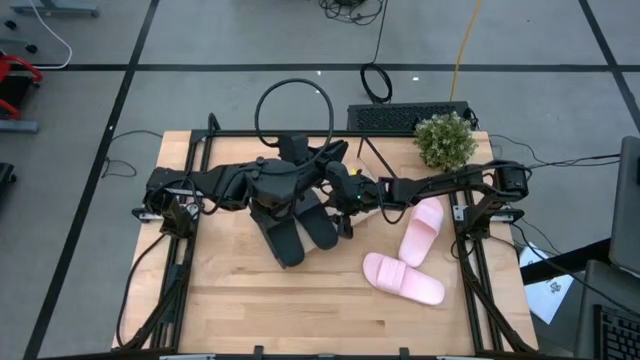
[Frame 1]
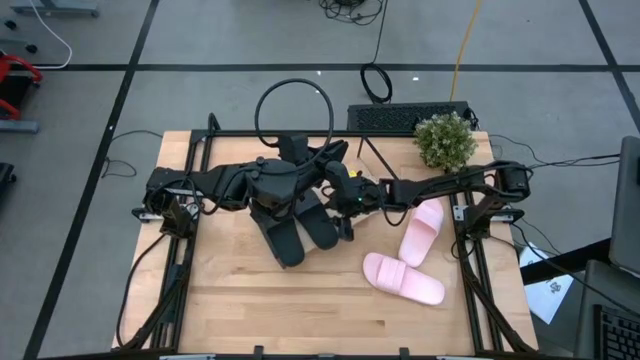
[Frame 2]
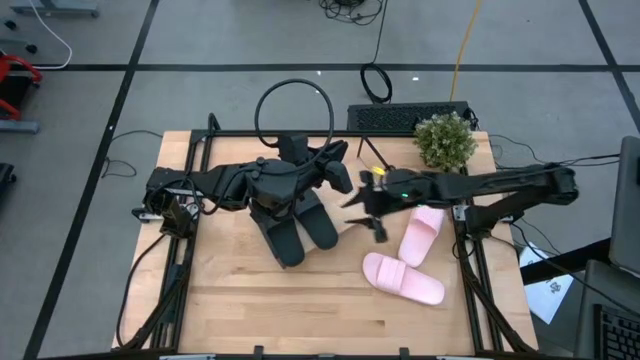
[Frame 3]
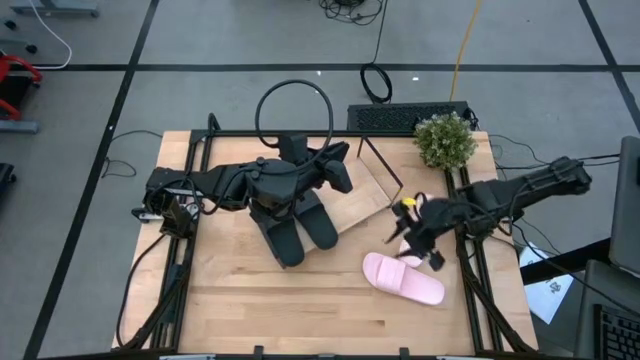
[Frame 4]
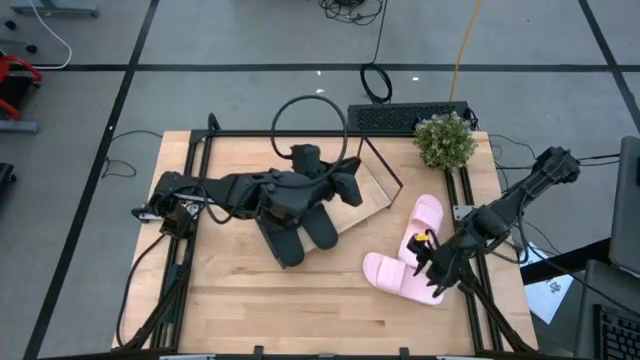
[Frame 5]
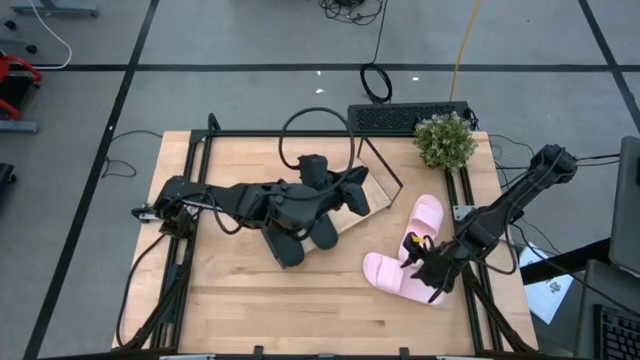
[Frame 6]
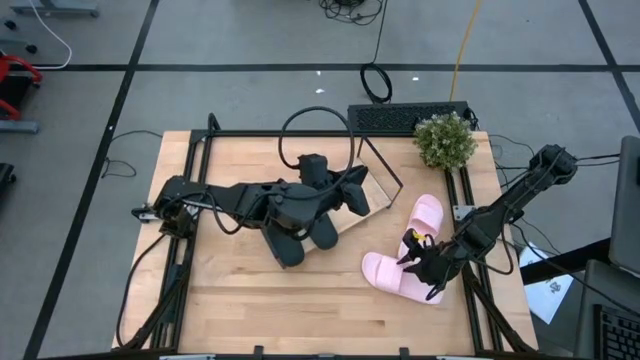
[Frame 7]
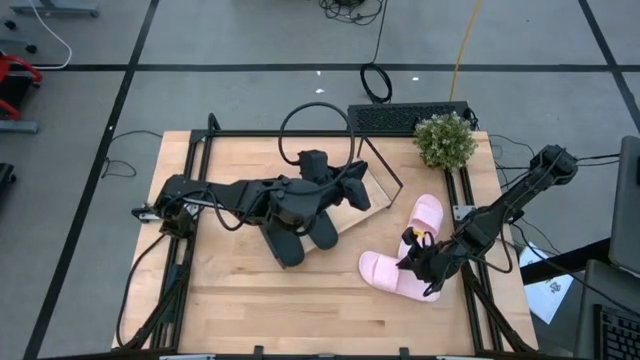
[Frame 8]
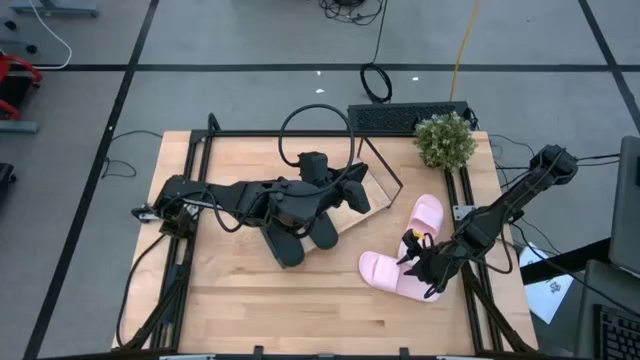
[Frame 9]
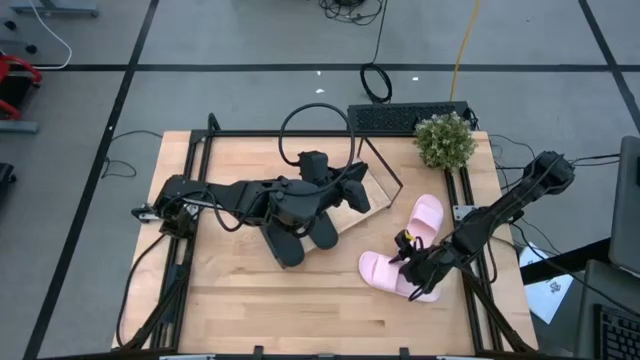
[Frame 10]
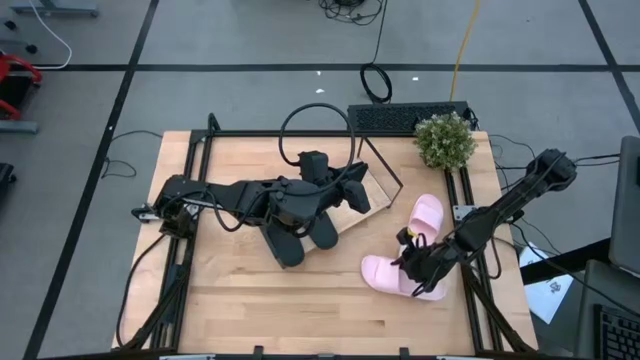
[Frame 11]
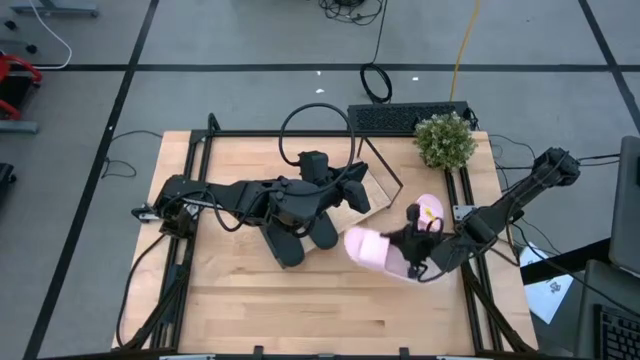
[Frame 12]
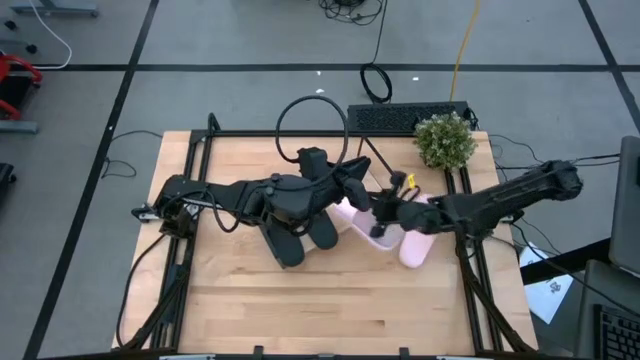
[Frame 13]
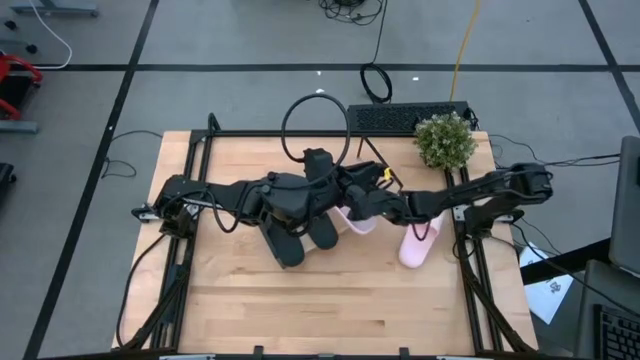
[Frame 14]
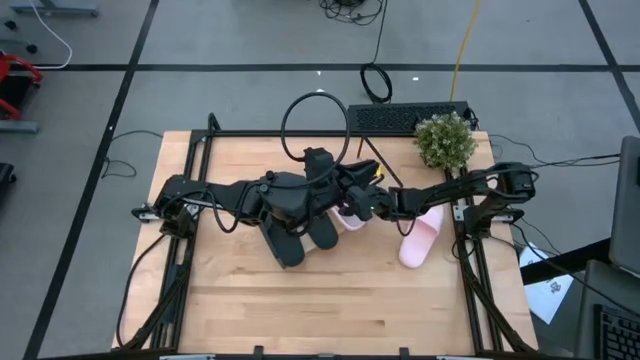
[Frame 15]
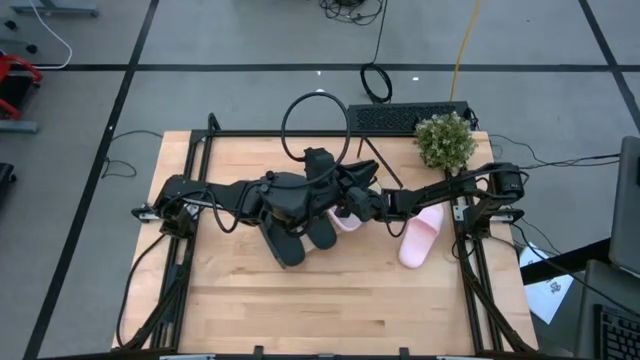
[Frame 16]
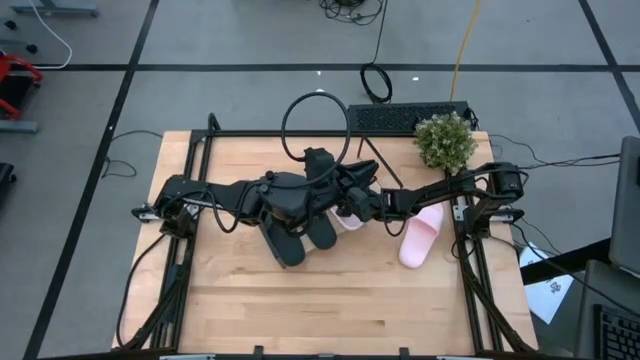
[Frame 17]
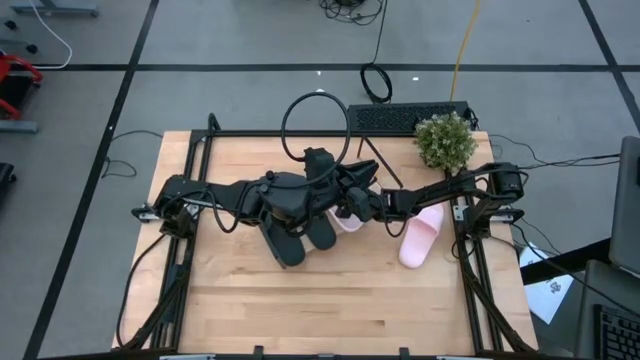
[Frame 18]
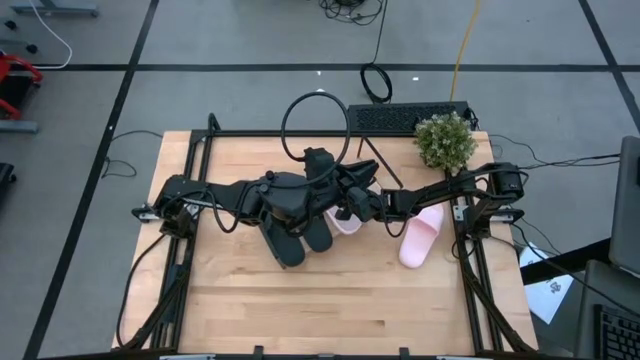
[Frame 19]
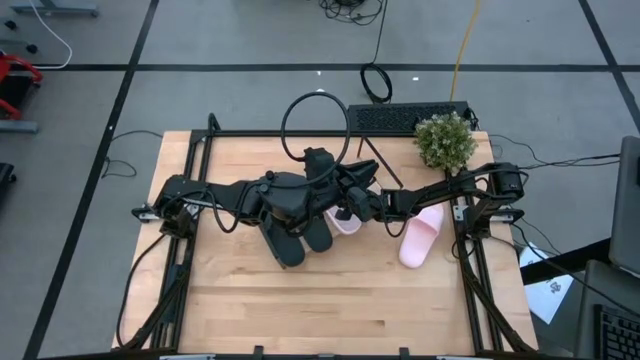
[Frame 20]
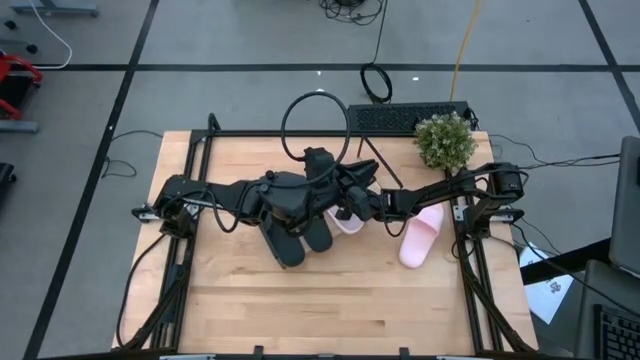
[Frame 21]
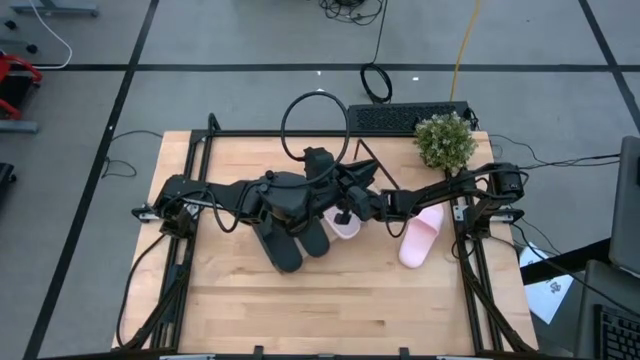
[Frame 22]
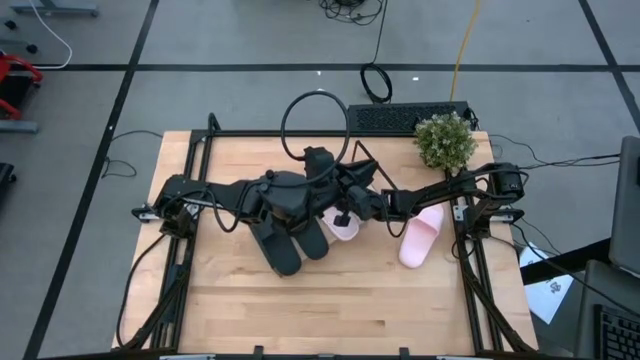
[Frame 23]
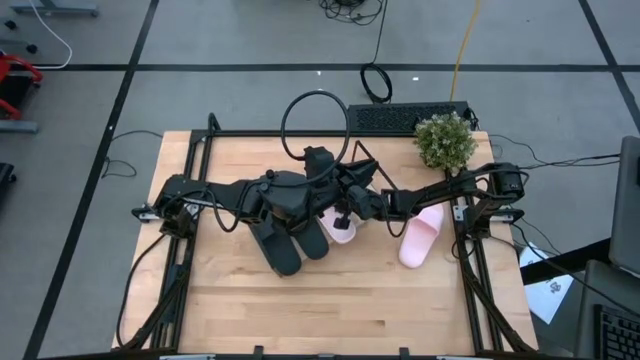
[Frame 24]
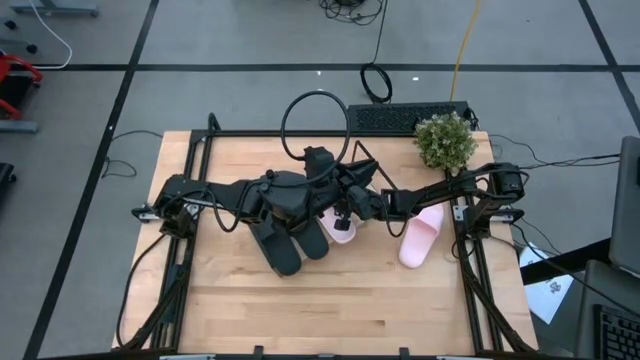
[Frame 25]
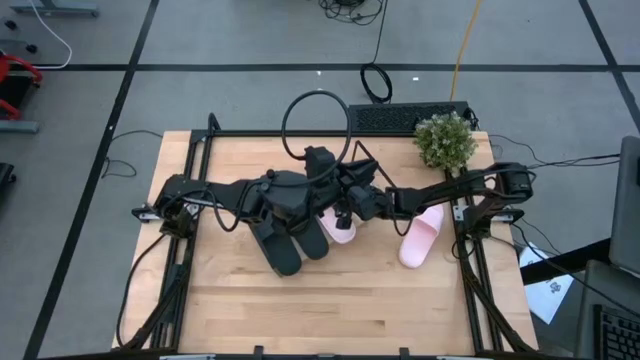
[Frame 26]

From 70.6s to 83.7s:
Task: Pick and place slides into the shelf
Put the bottom pink slipper on the shelf

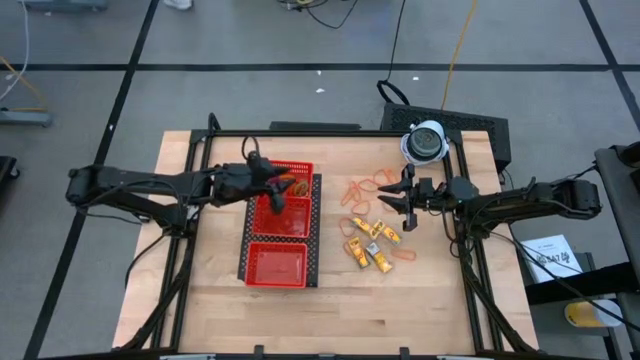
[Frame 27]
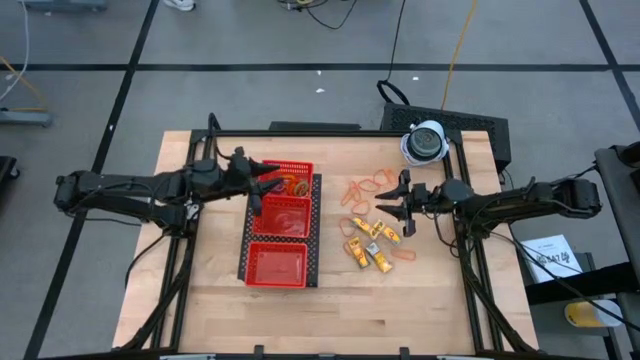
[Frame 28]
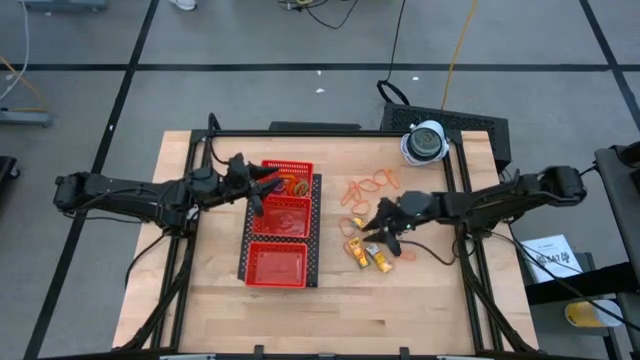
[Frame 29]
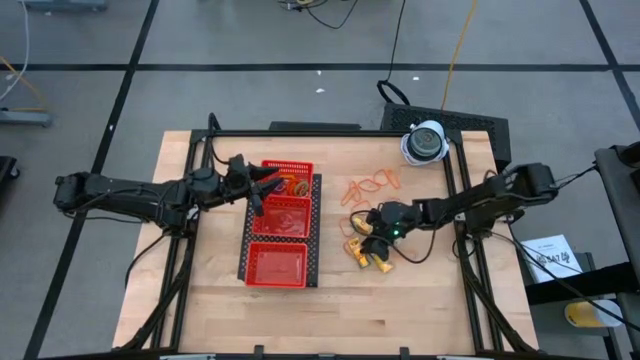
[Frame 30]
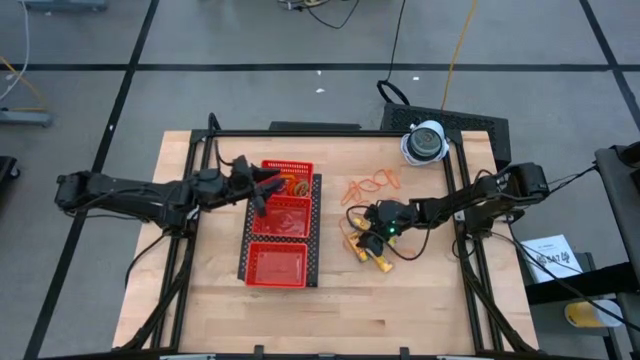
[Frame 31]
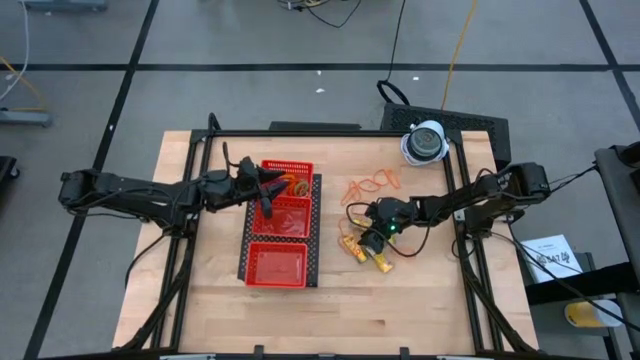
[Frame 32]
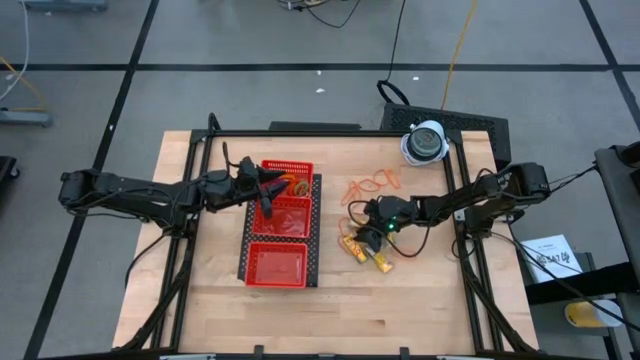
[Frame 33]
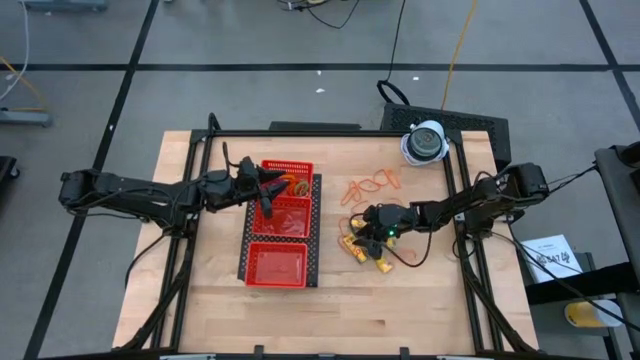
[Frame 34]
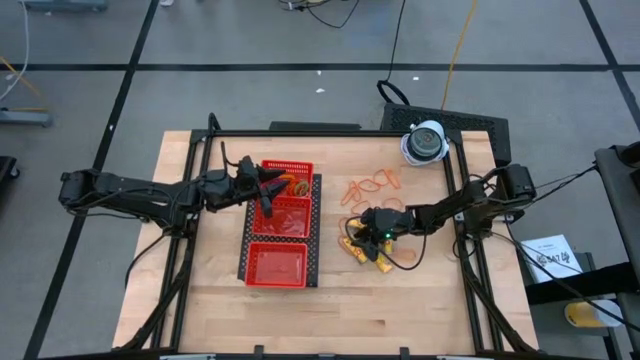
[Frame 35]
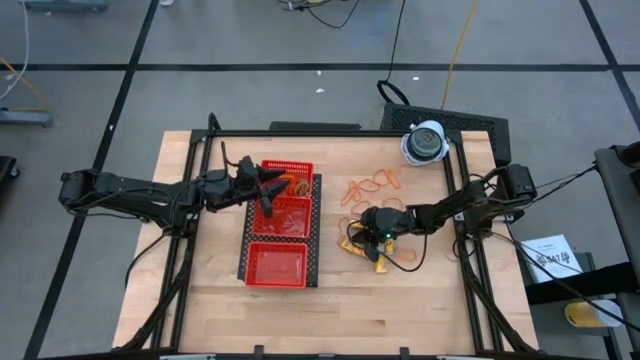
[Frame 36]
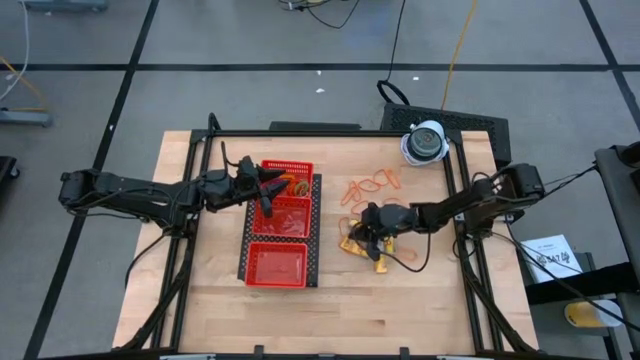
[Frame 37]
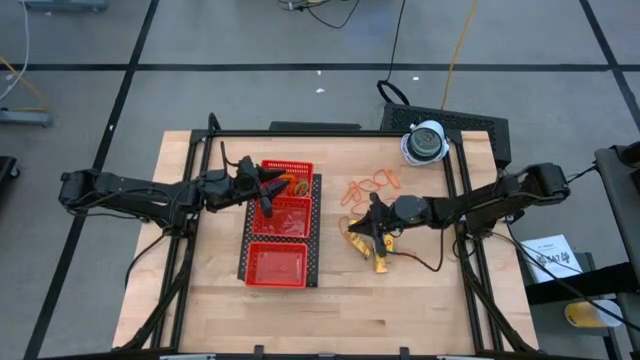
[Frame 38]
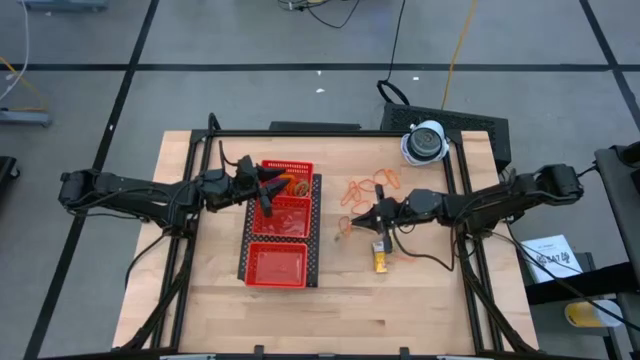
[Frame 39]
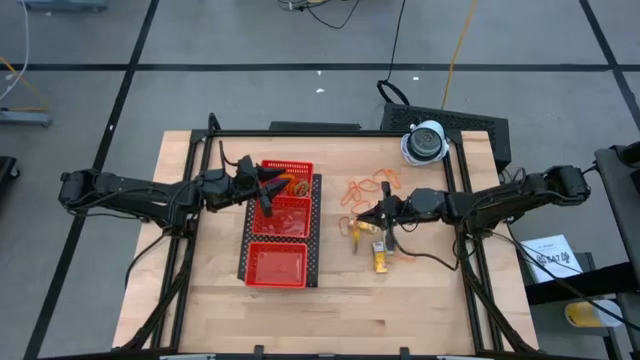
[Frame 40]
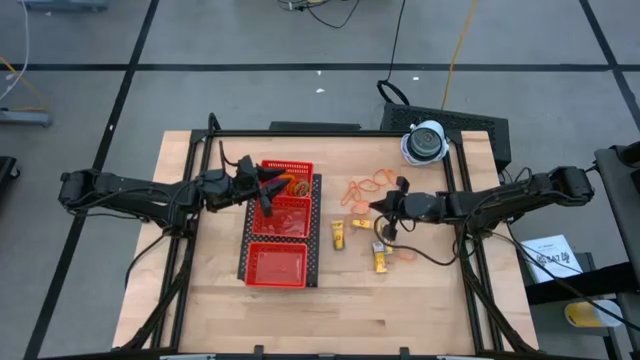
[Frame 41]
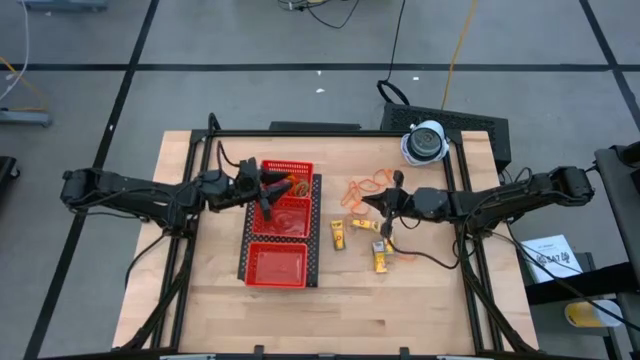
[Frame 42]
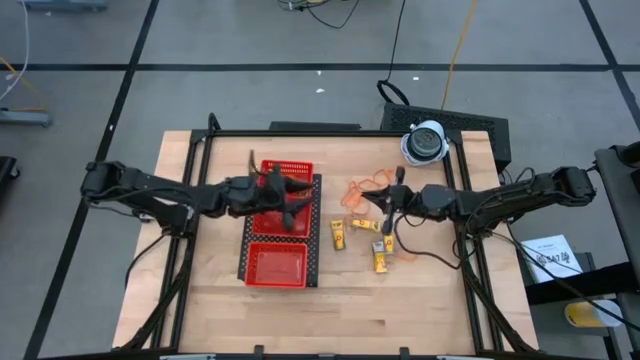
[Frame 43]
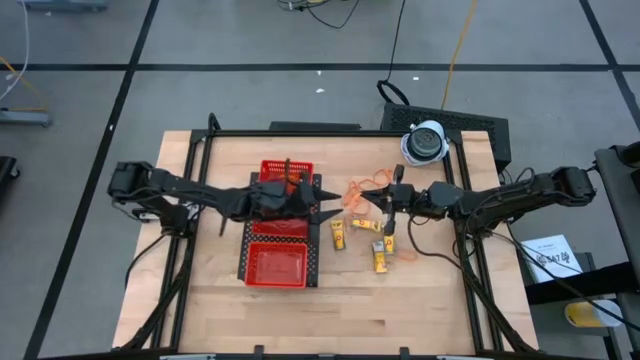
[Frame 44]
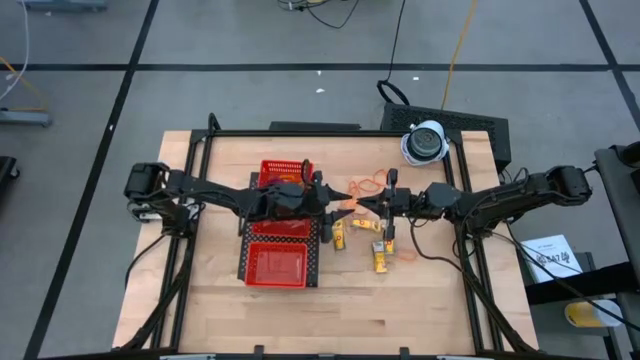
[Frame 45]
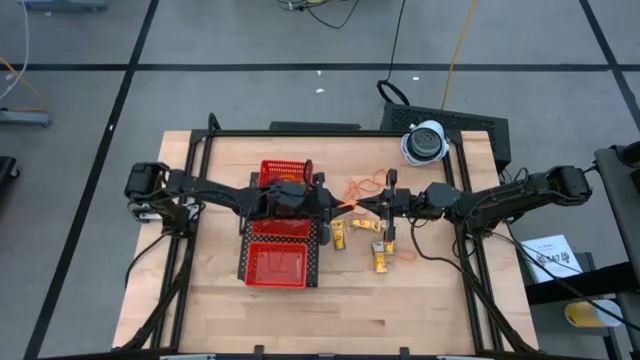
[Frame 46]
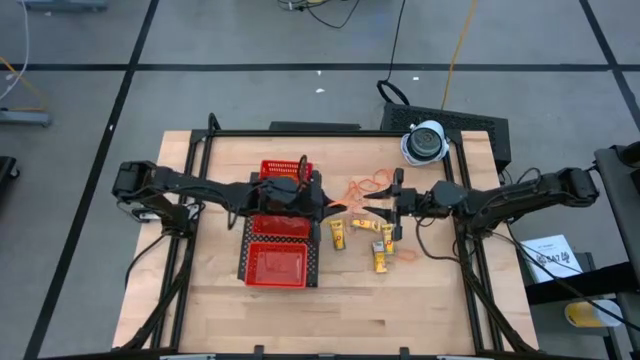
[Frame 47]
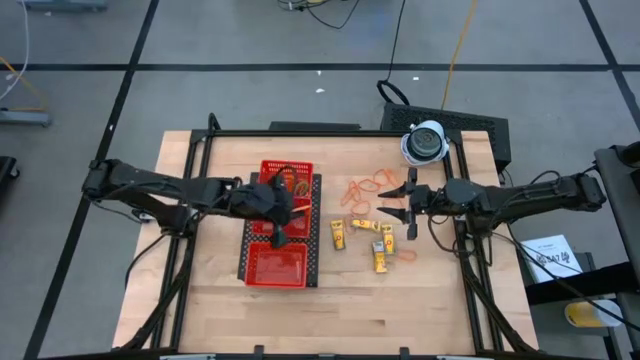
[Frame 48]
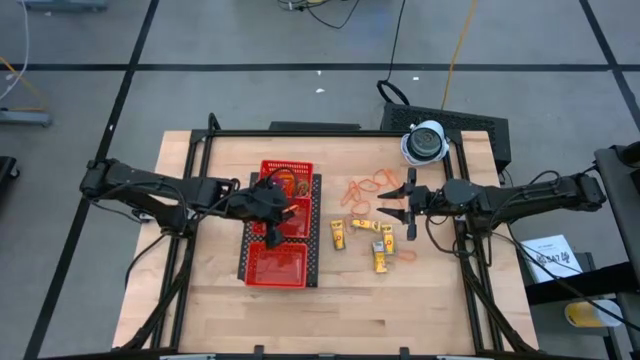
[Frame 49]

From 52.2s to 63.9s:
Task: Pick & Place Office Desk Supplies
Put the orange rubber band into the middle red basket on the shelf
